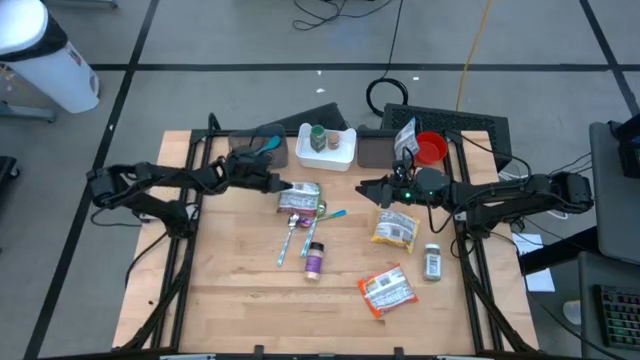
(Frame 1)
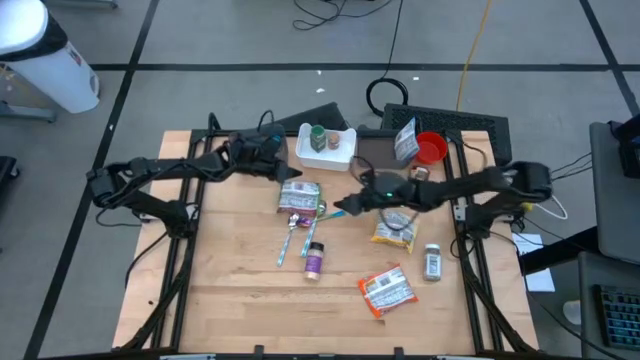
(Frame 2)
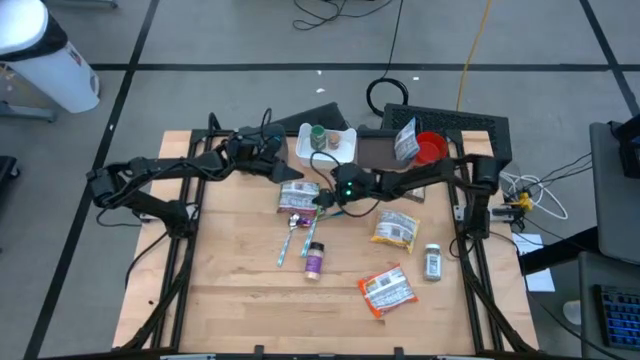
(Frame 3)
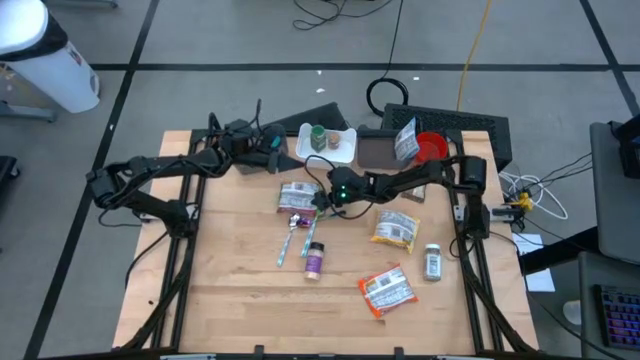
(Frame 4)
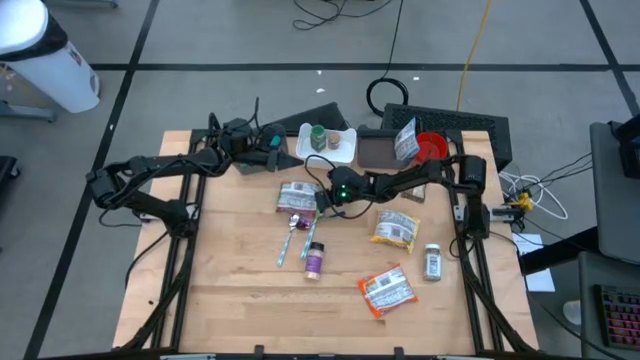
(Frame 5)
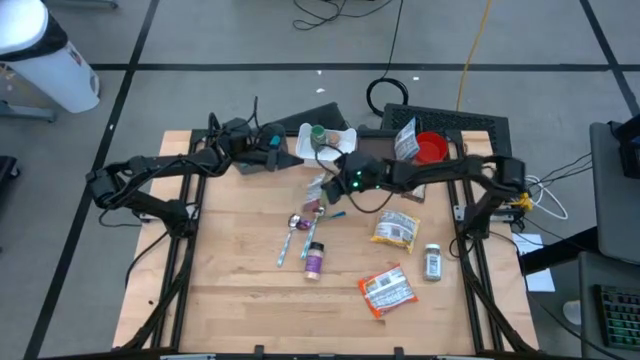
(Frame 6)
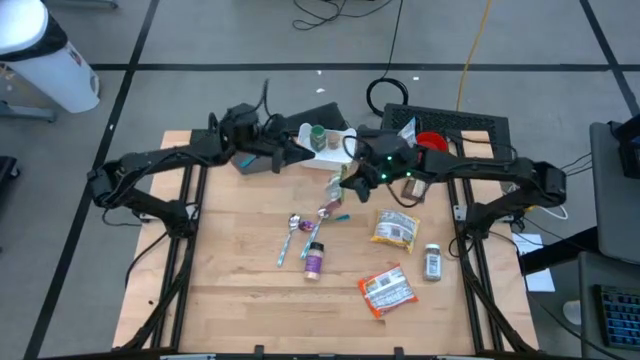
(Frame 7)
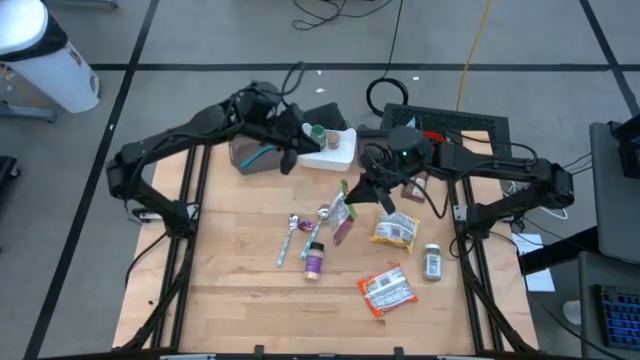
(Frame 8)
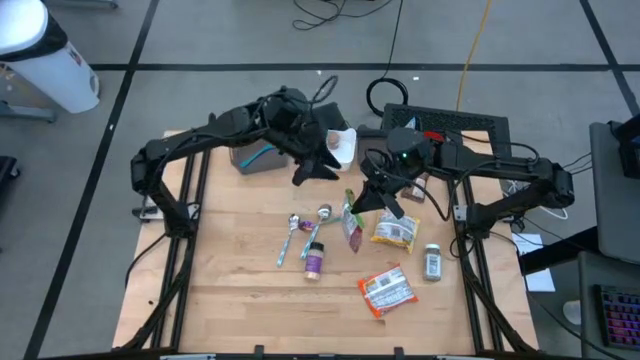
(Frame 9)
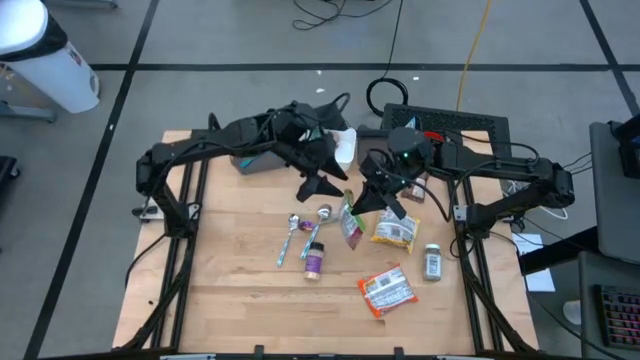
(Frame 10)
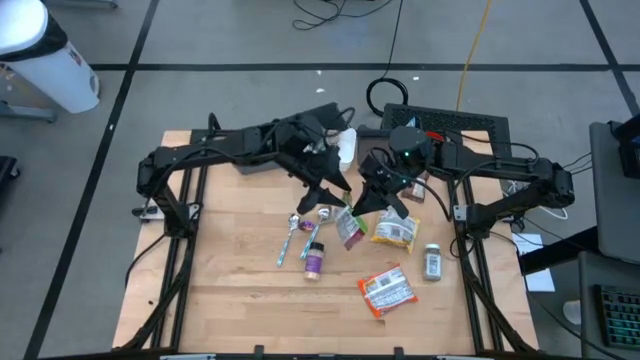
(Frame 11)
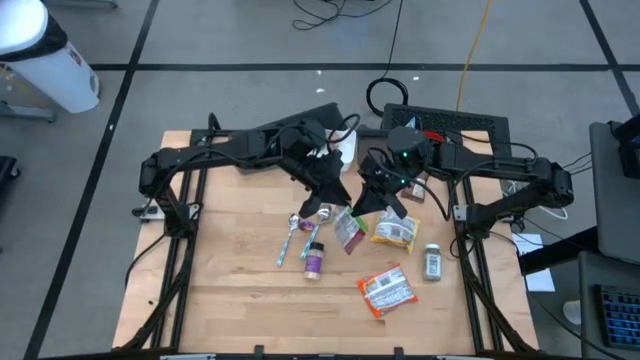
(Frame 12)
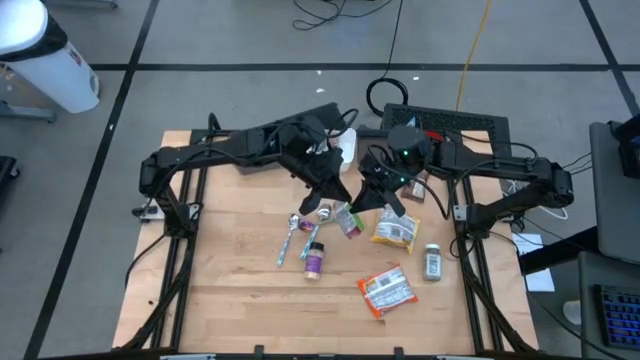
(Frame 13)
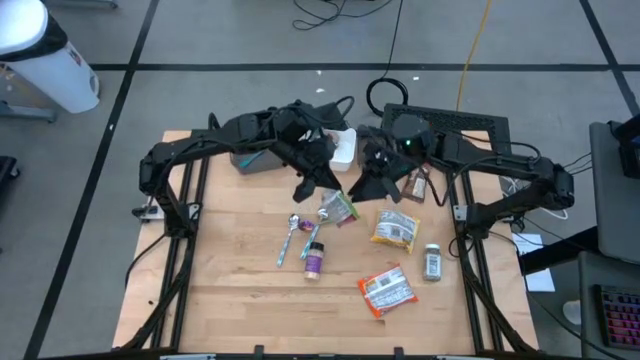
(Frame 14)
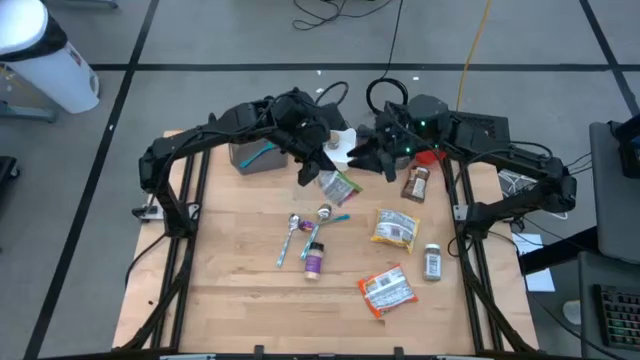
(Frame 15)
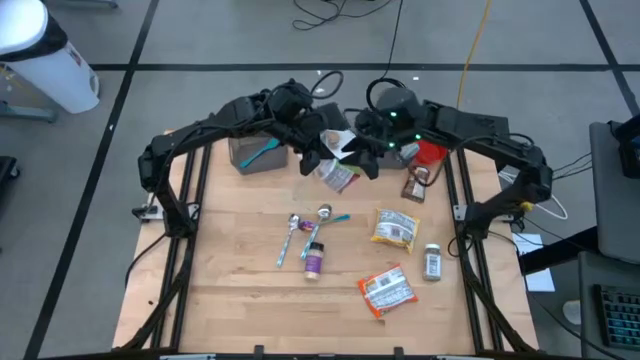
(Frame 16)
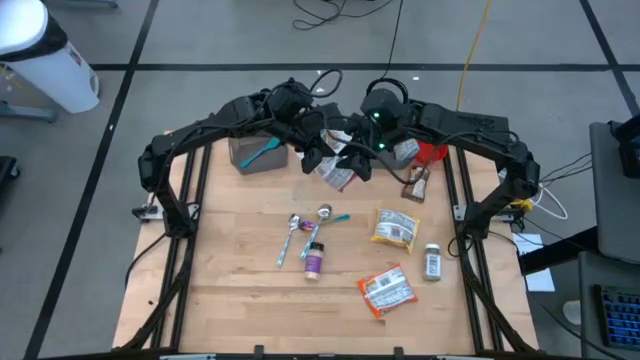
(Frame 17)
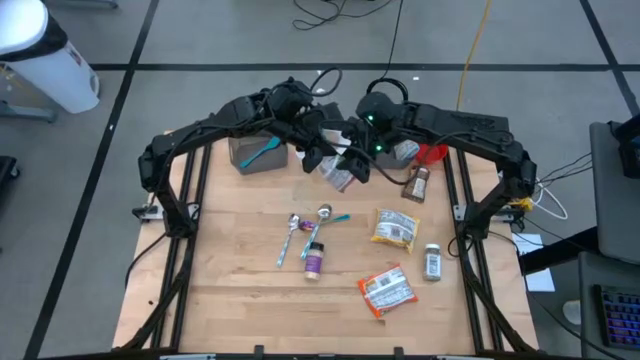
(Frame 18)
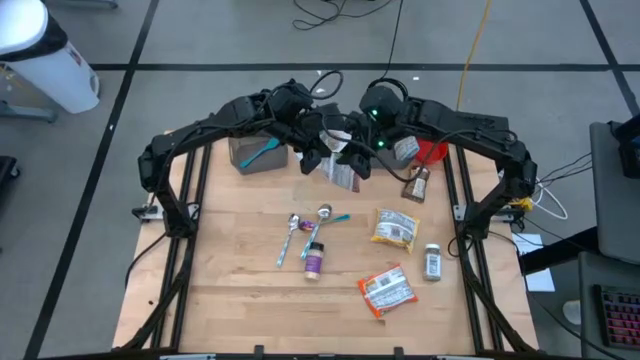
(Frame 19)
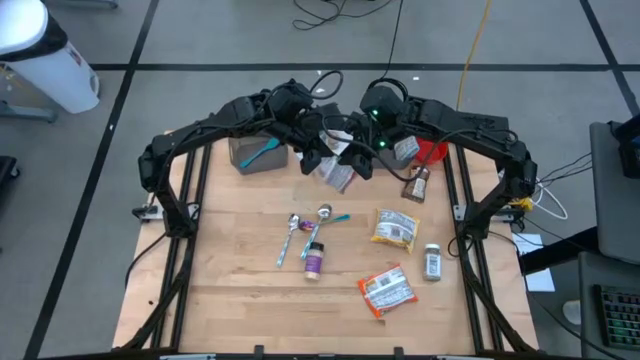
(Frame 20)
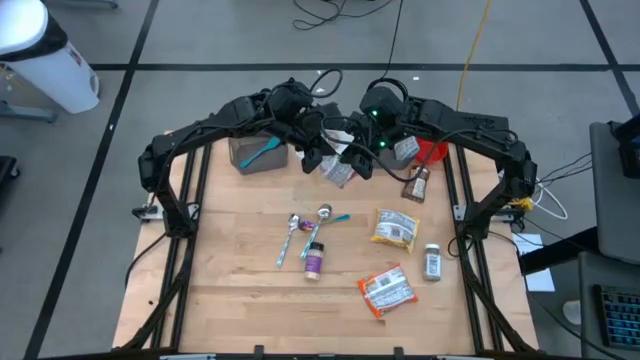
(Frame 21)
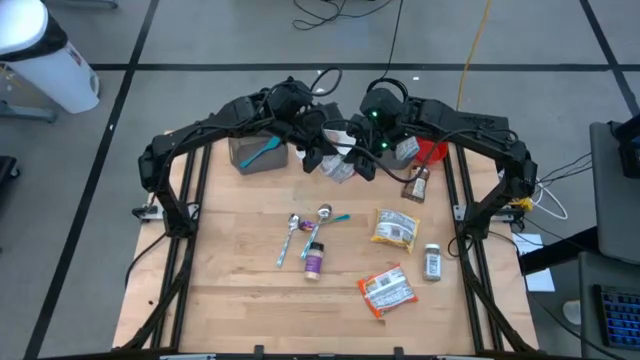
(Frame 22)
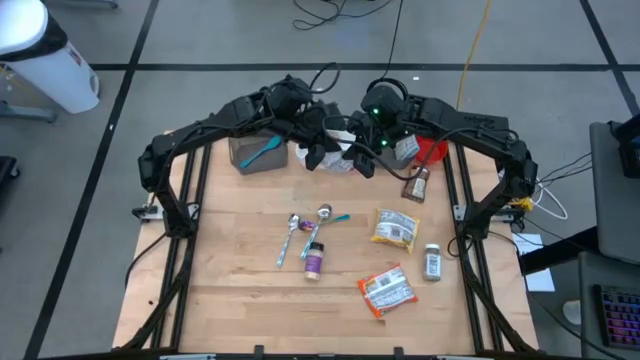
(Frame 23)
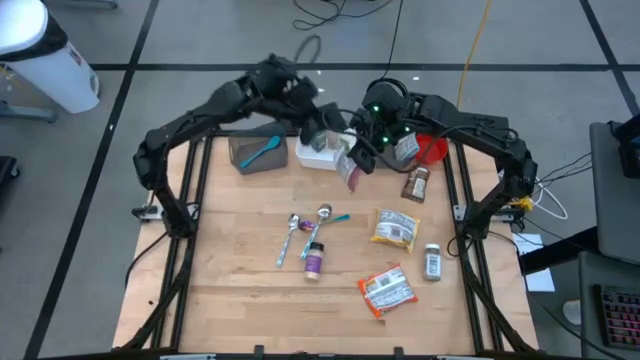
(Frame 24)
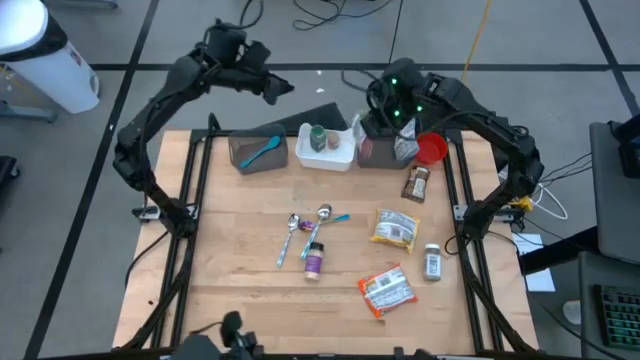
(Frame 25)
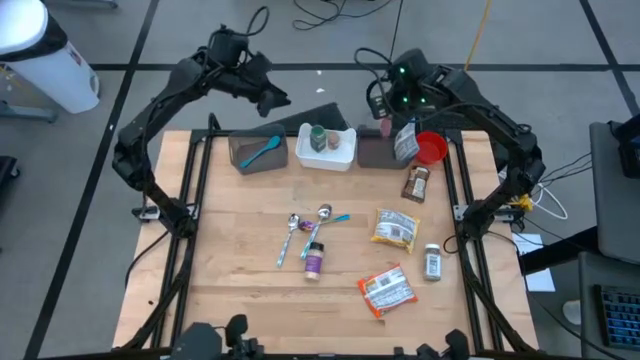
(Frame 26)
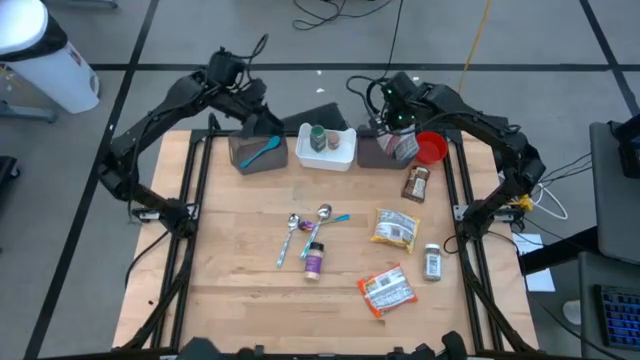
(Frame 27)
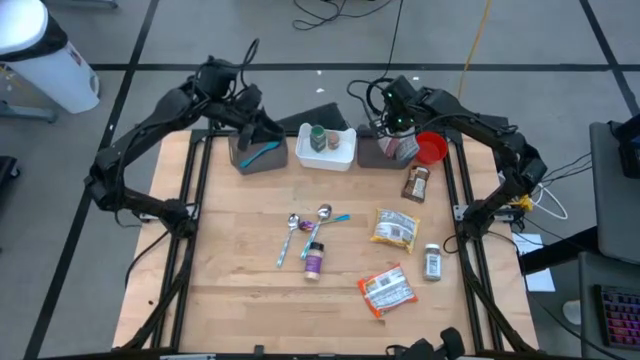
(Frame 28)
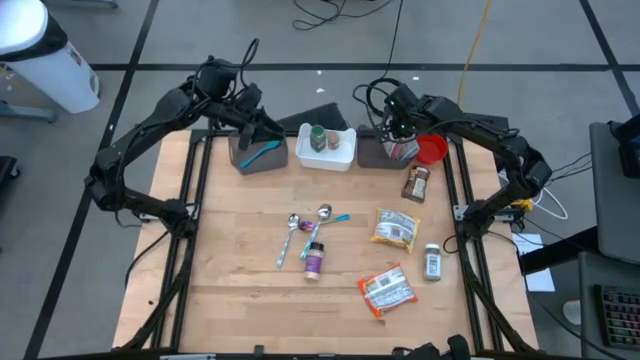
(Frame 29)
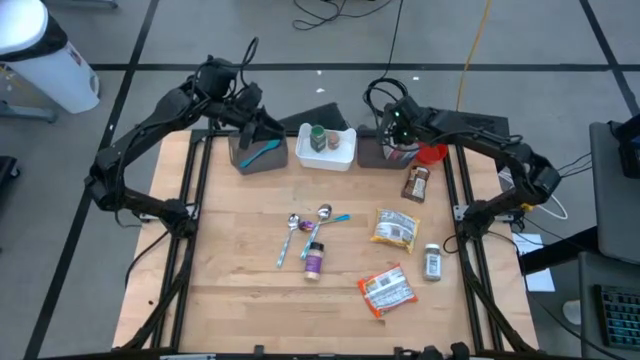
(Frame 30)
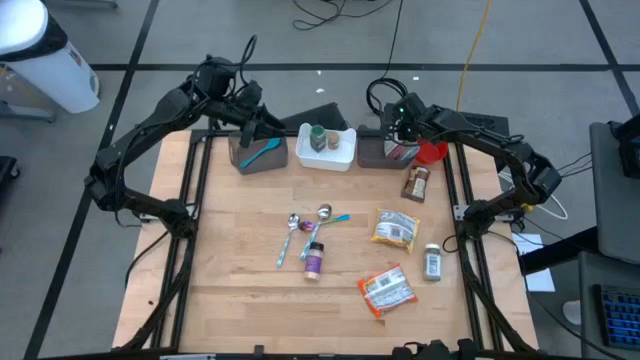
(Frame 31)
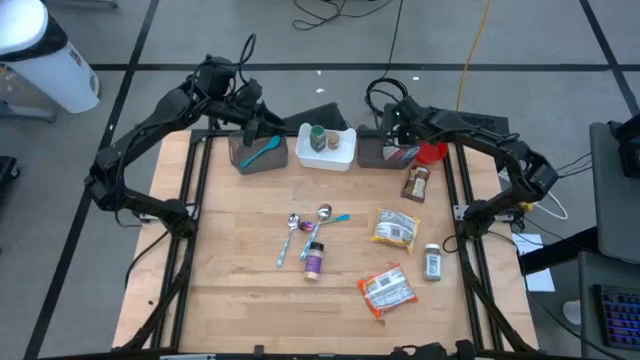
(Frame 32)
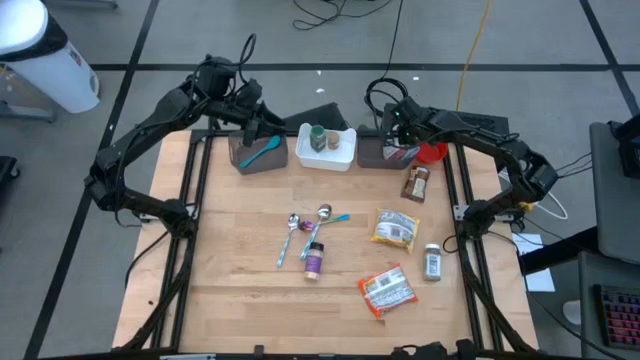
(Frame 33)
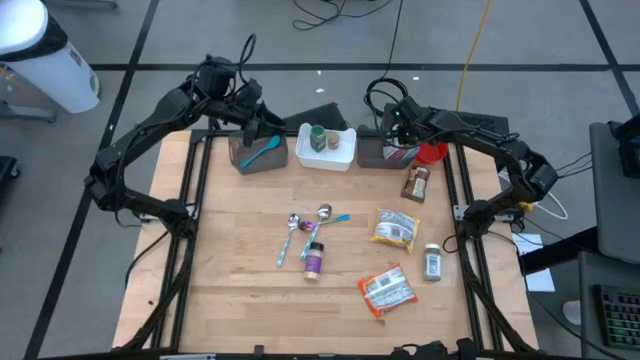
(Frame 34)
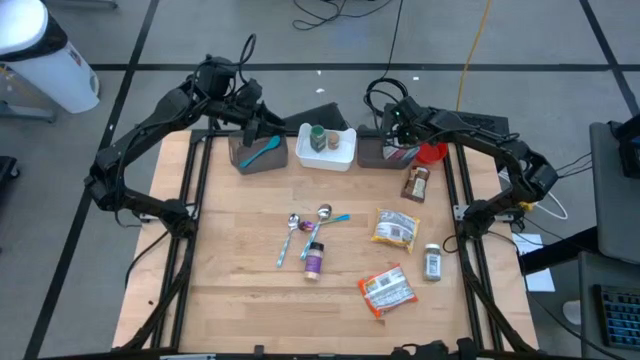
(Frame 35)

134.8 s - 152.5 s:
Task: Pick & Place Food Item
Put the green noodle pack into the right black bin

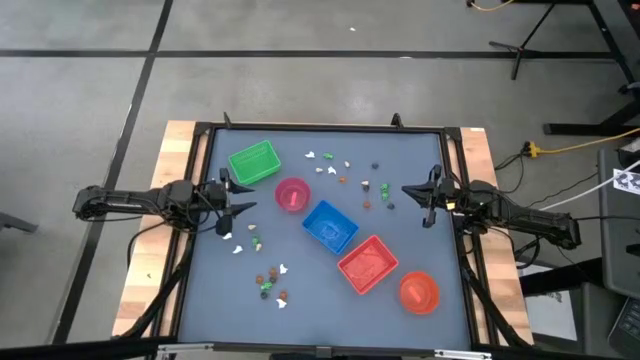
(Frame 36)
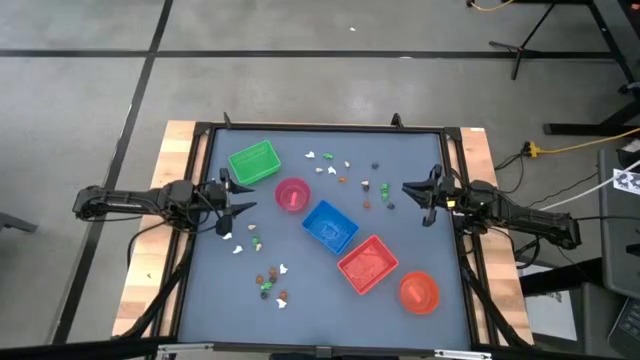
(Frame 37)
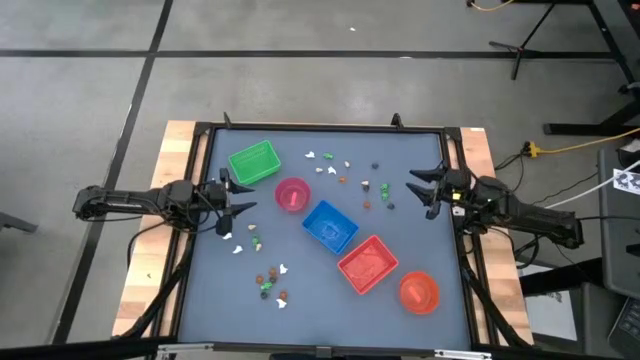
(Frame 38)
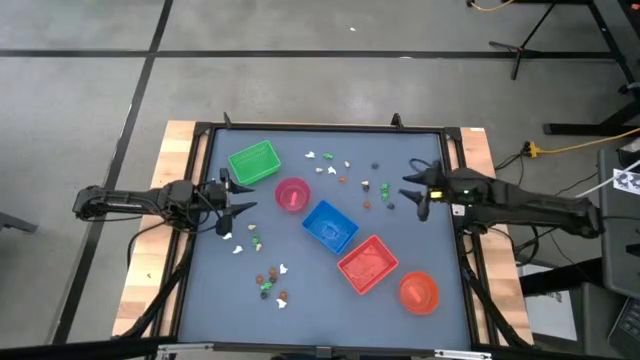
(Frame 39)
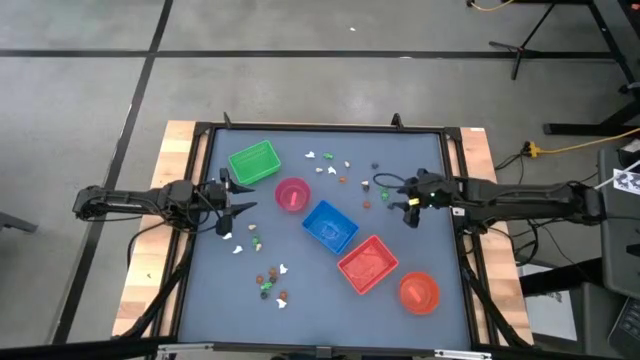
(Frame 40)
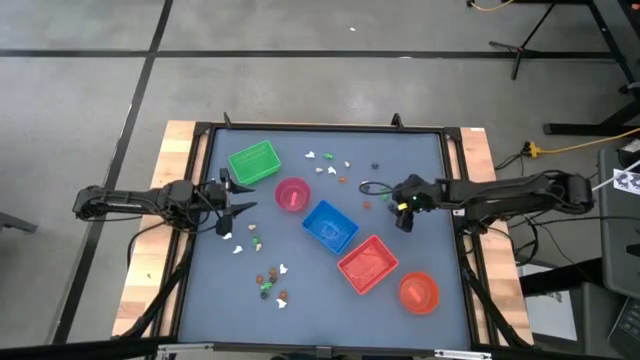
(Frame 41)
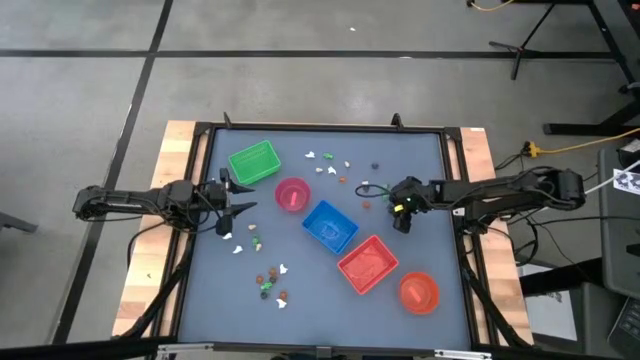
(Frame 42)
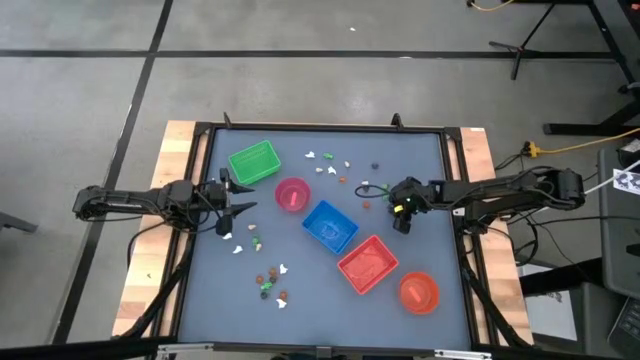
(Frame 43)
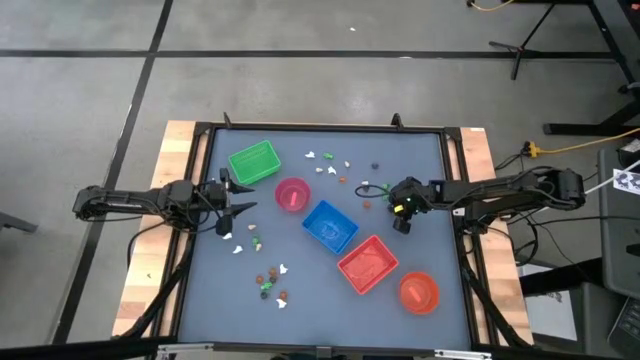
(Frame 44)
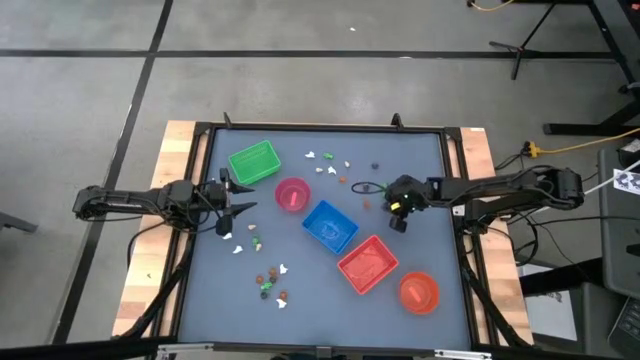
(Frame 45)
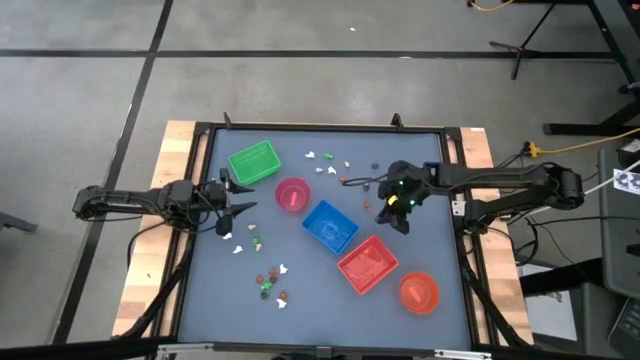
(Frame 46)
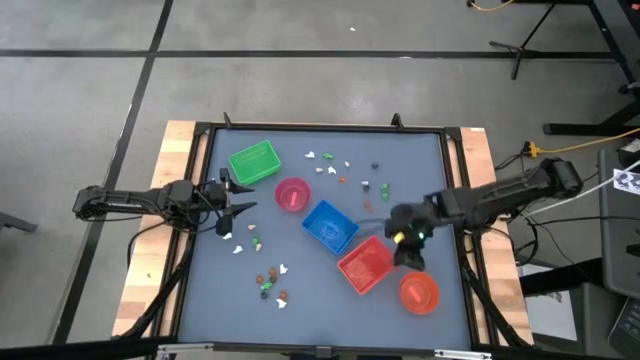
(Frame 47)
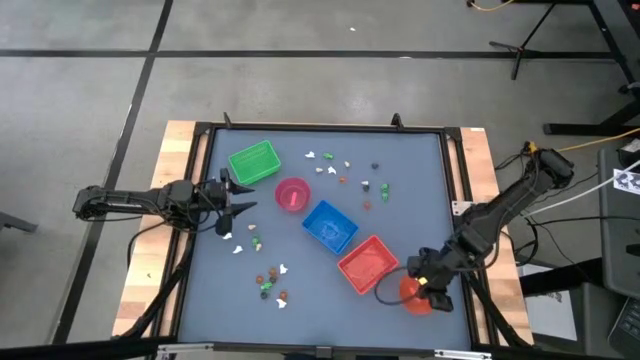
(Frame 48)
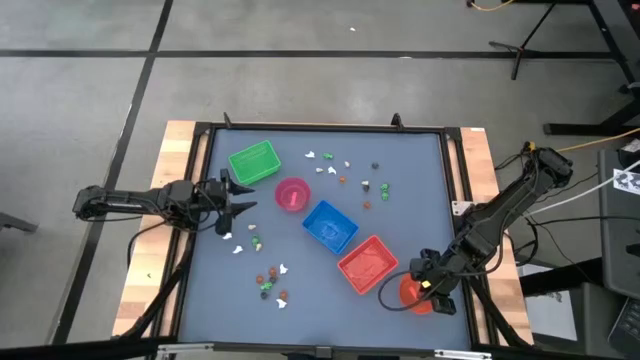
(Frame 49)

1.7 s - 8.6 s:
Task: Sort Halloween decoration
Put the black skull toy into the transparent orange bin
